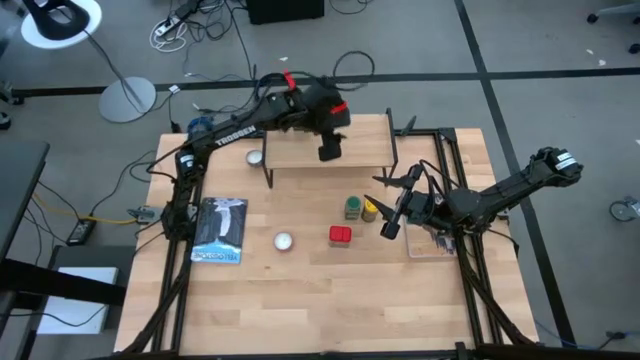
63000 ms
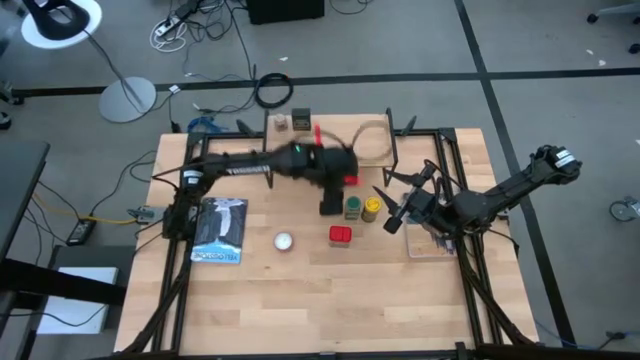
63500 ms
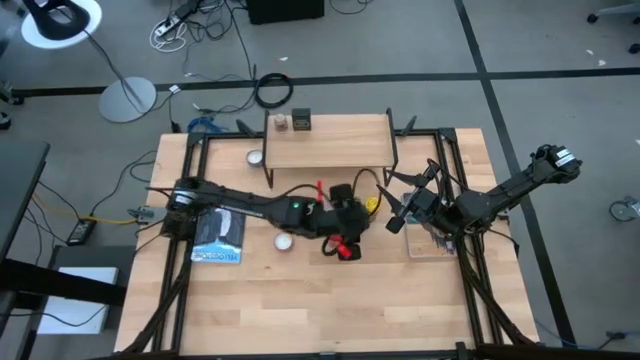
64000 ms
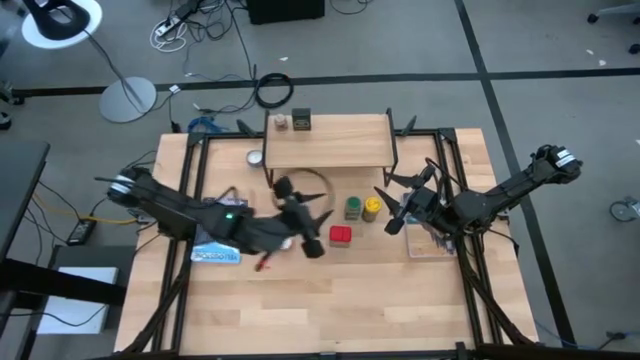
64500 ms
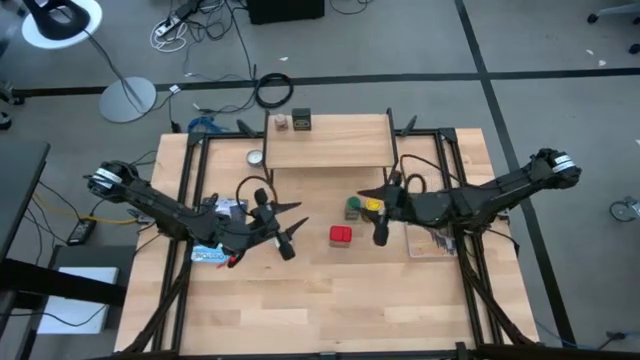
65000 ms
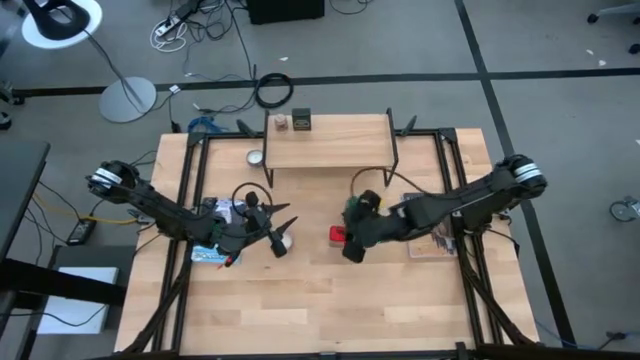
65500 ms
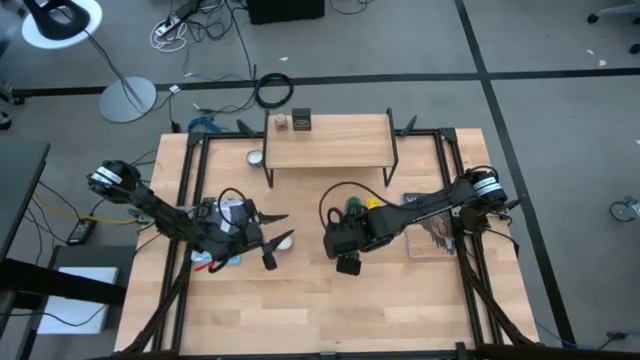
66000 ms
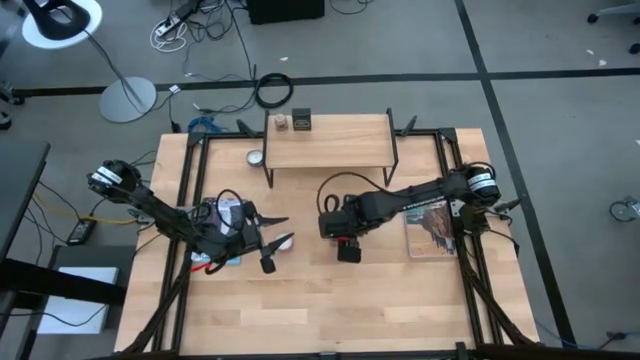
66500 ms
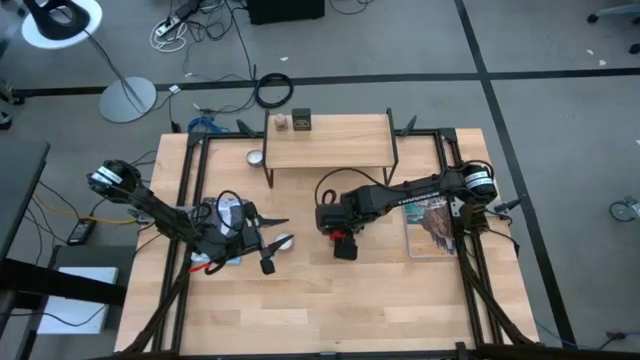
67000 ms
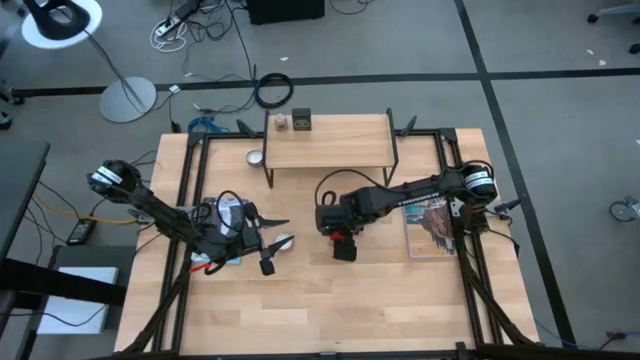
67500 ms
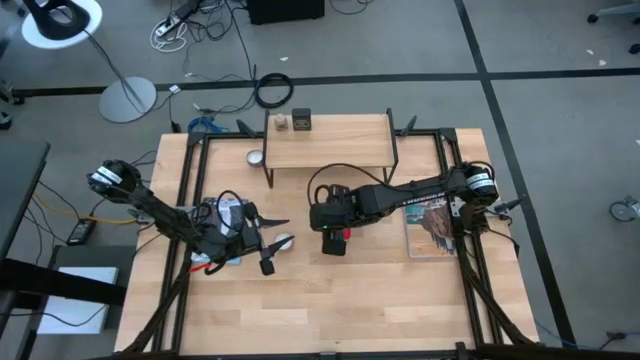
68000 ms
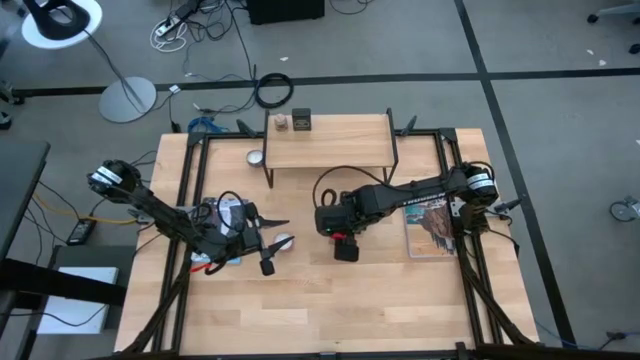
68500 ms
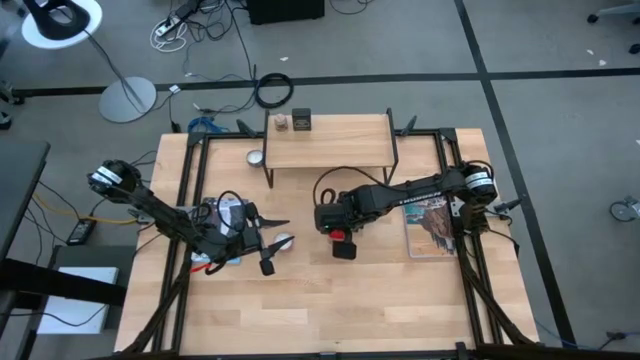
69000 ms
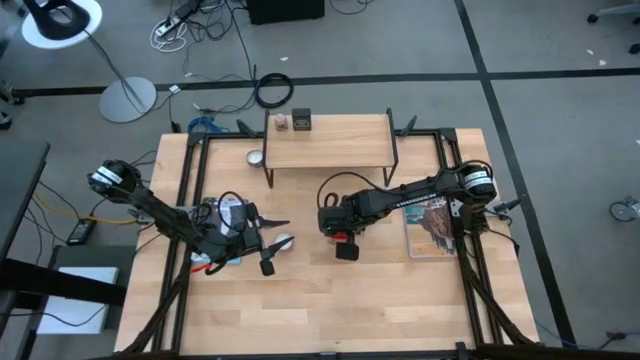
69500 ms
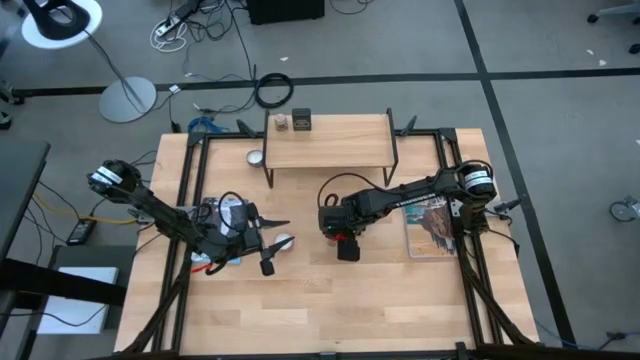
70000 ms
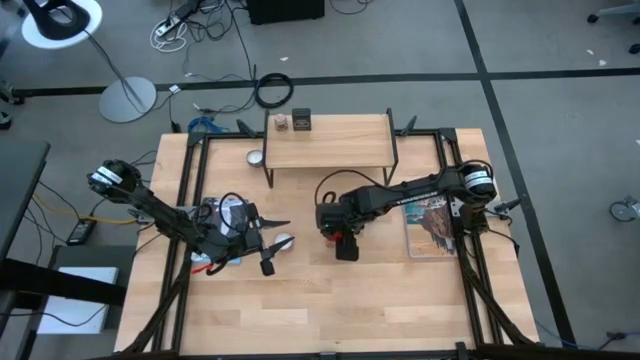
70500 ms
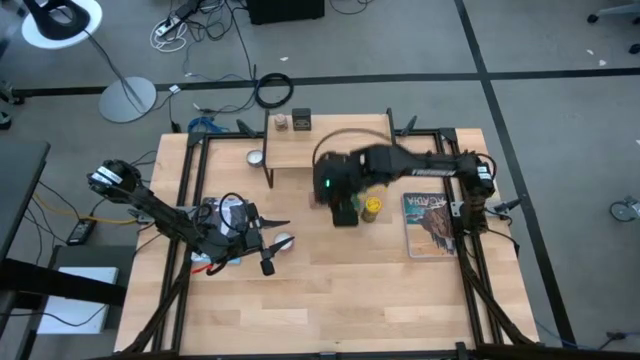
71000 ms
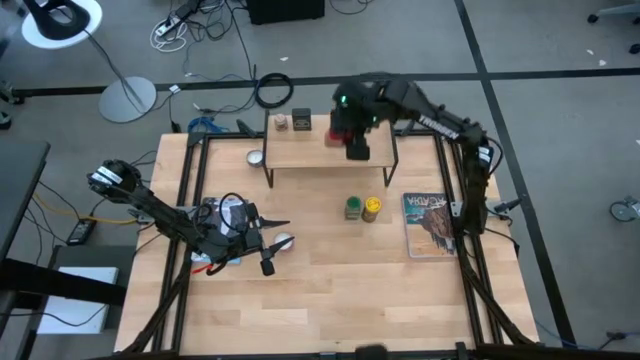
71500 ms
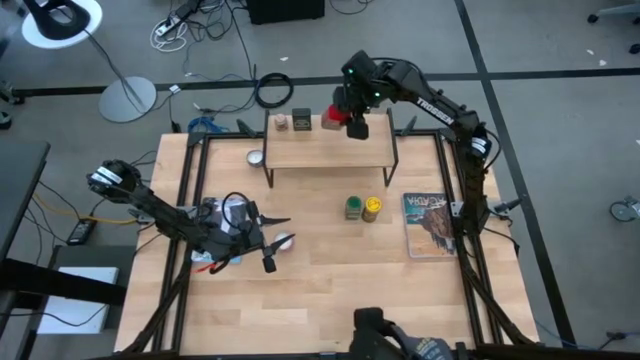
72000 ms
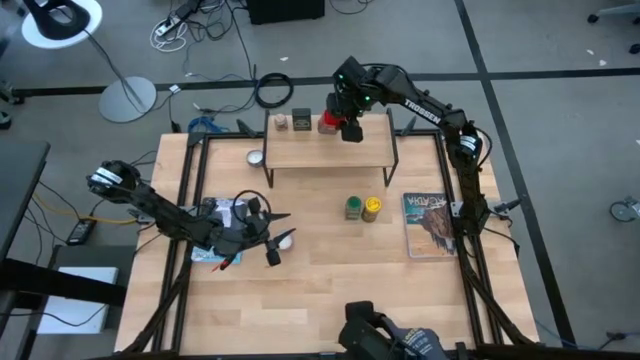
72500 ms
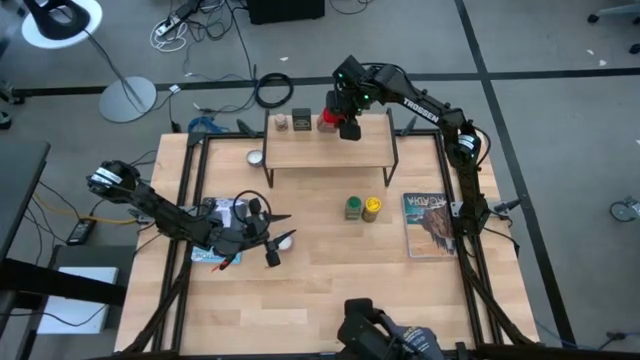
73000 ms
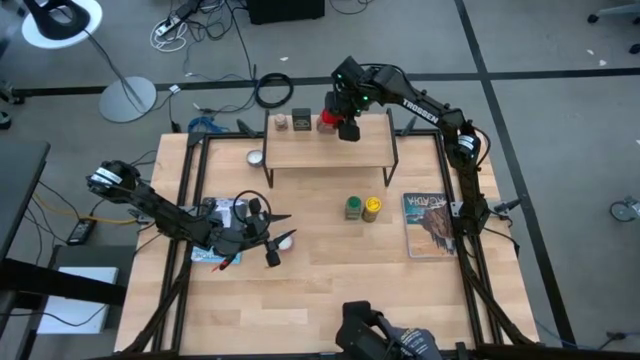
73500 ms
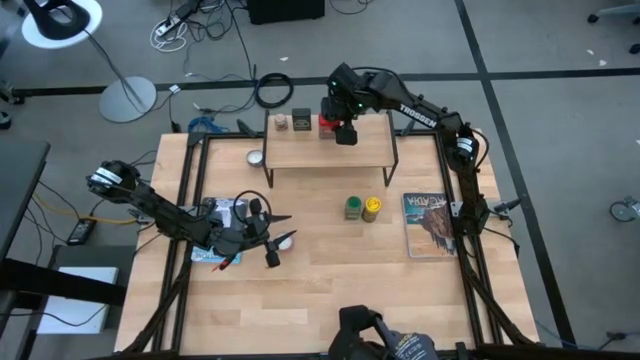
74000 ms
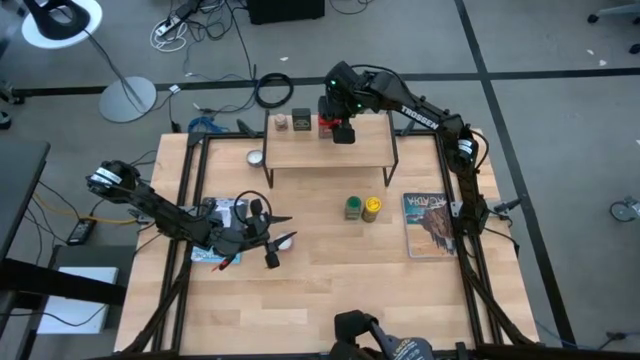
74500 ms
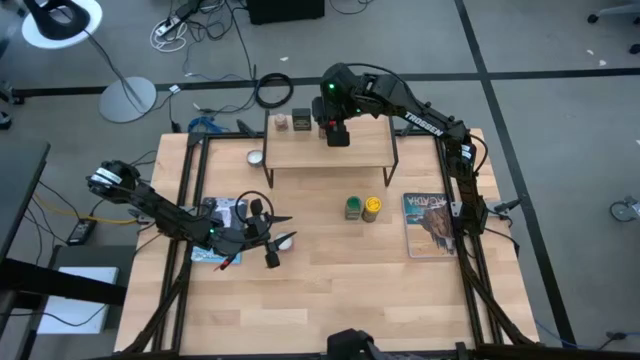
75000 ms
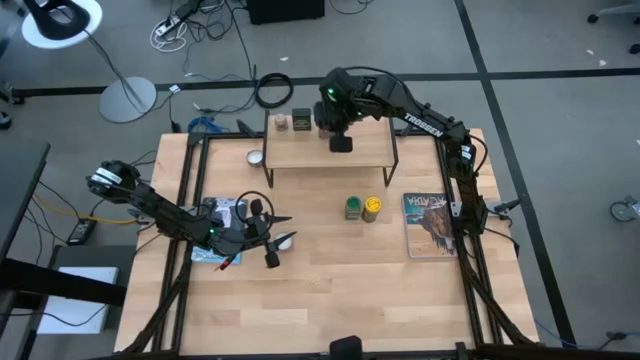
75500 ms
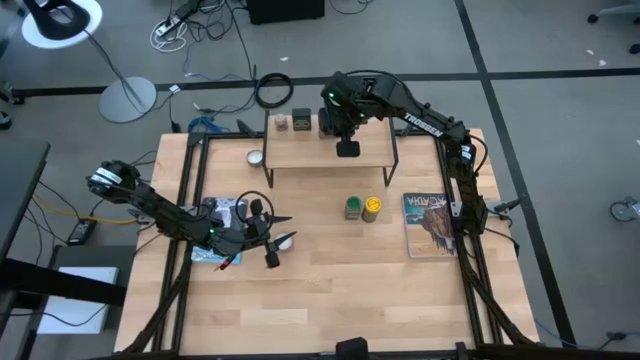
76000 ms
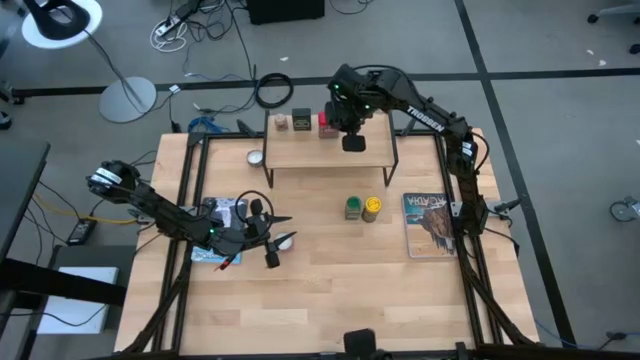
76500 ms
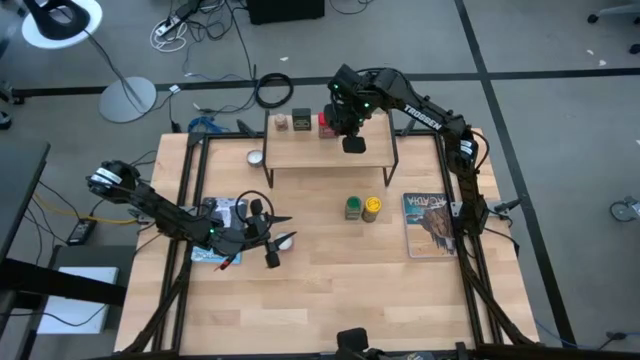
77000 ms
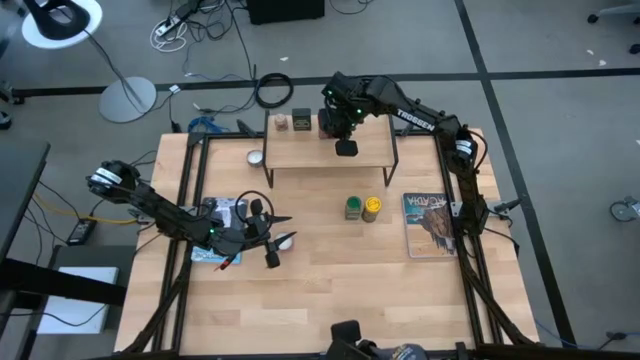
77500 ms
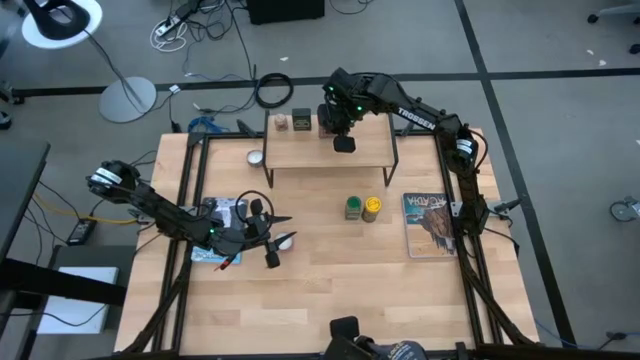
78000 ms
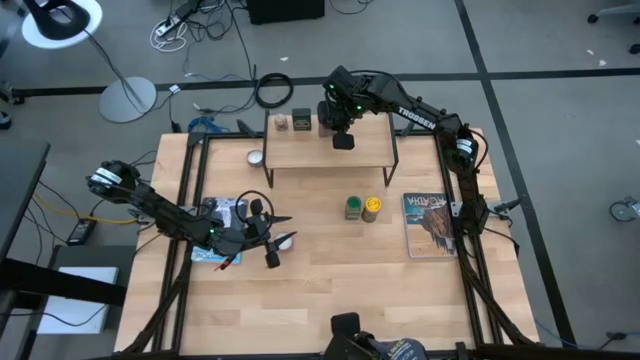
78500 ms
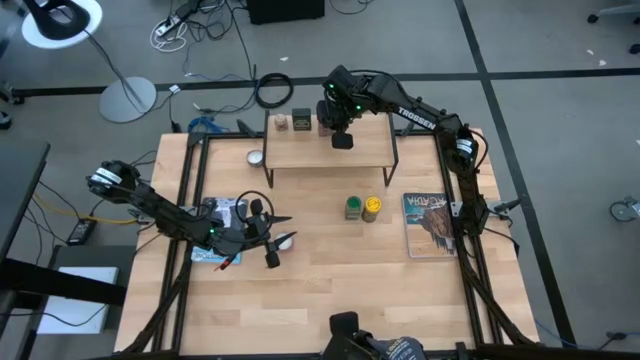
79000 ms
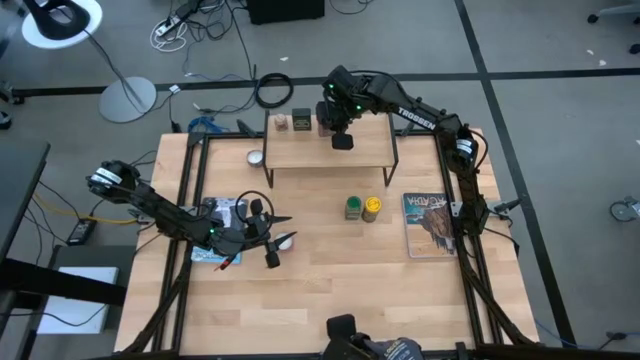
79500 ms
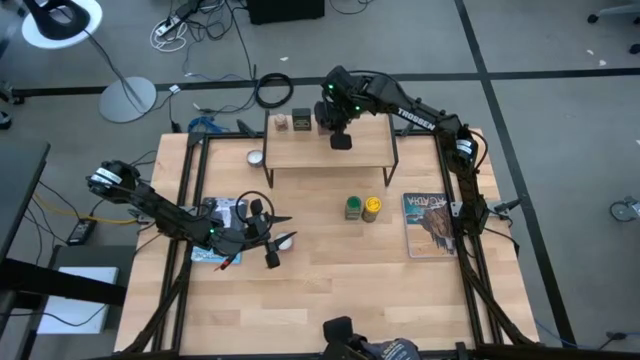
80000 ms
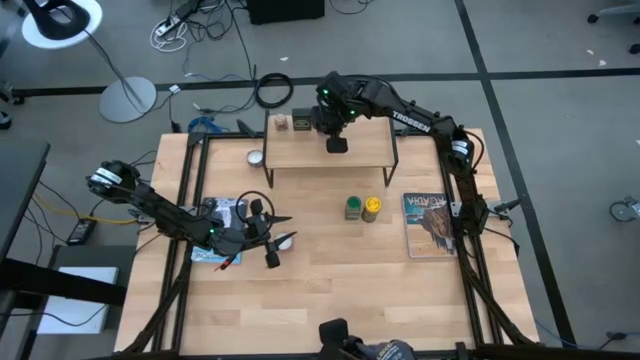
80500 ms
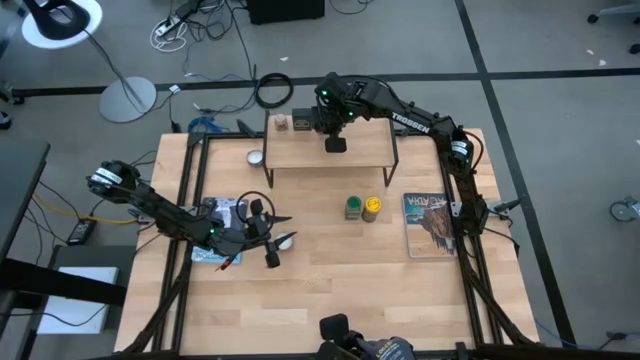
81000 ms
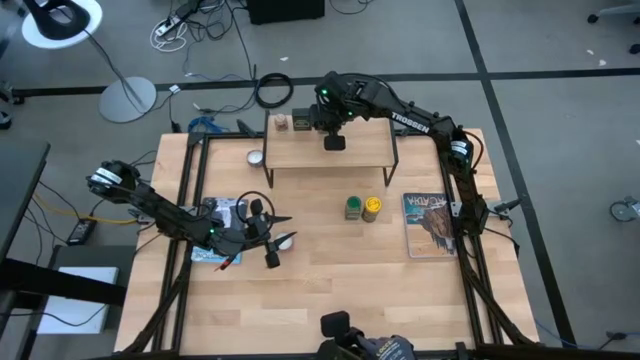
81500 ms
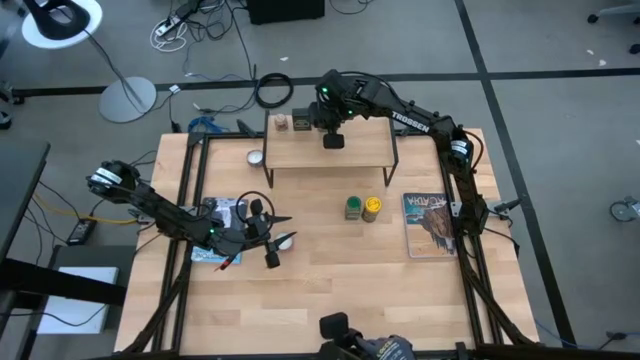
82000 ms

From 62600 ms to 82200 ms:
Task: Shelf spices
Put the red seasoning can on the shelf

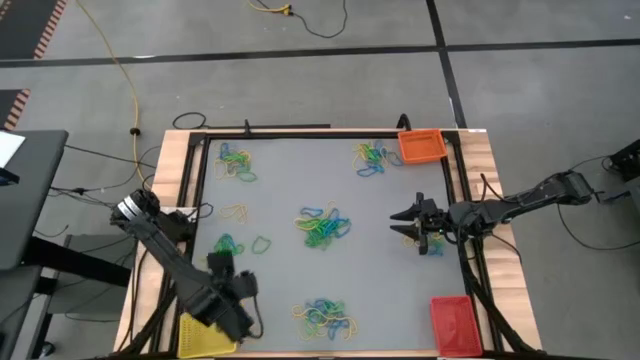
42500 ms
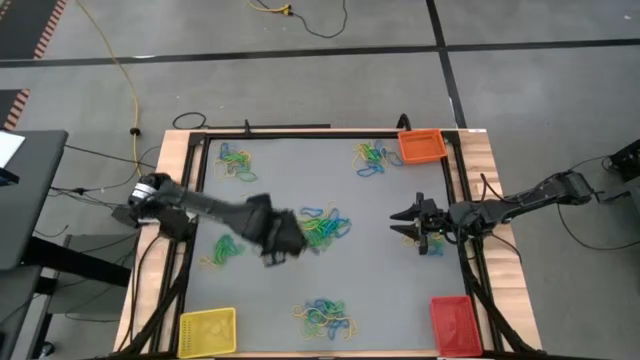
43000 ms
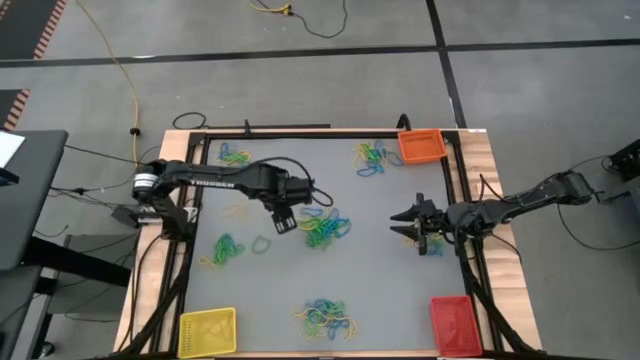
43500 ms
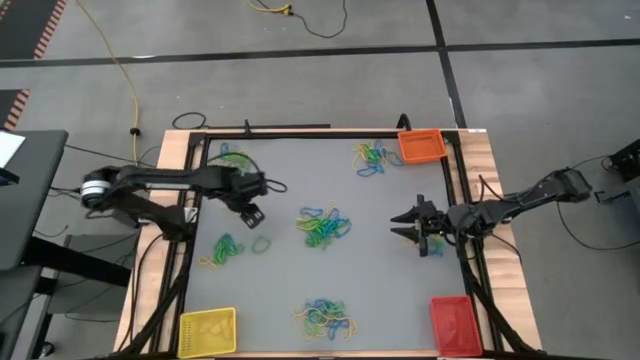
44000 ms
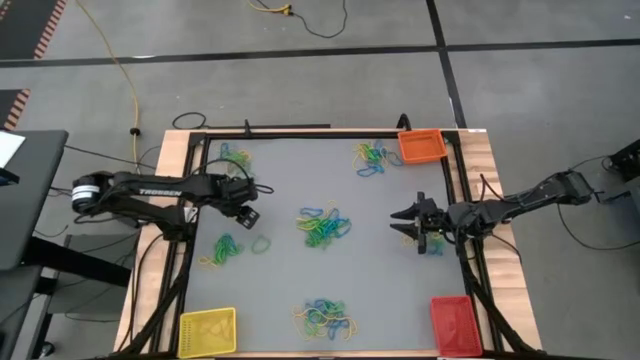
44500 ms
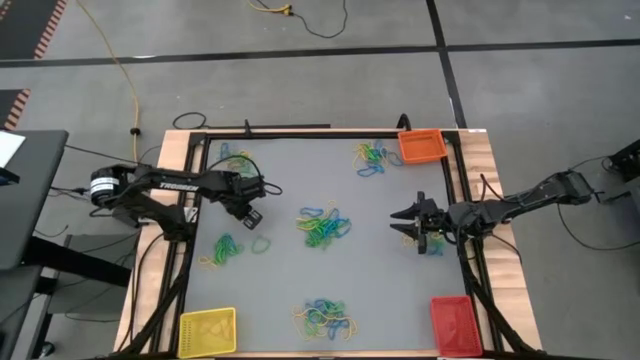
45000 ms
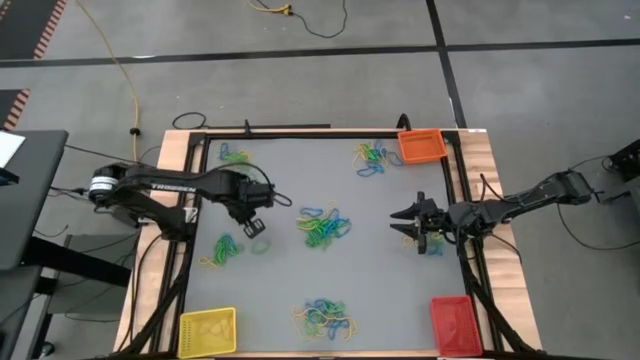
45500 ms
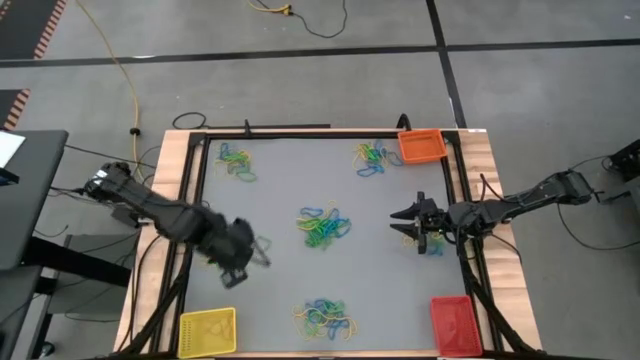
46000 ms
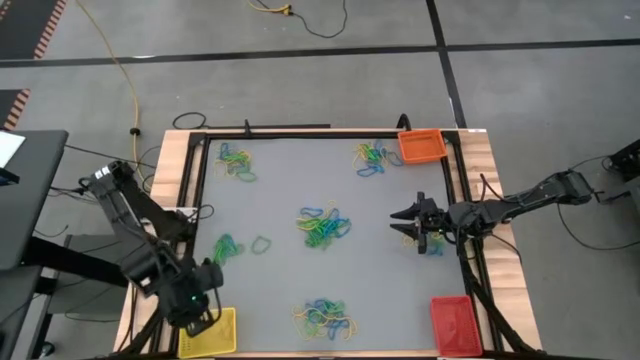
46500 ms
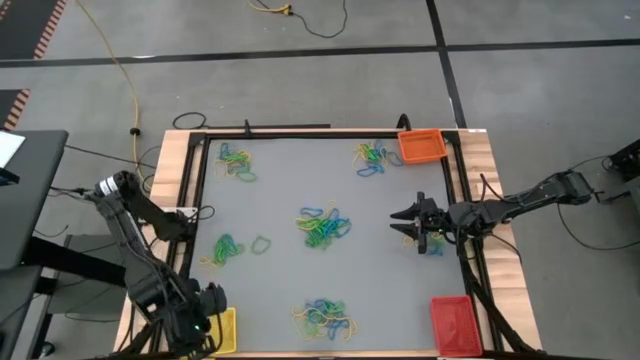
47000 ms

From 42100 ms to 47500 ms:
Task: Sort rubber bands into baskets
Put the yellow rubber band into the yellow bin
